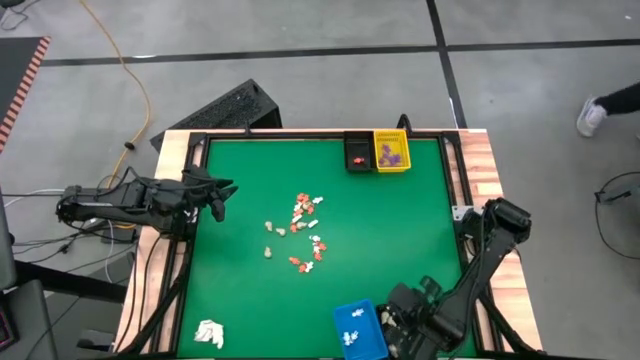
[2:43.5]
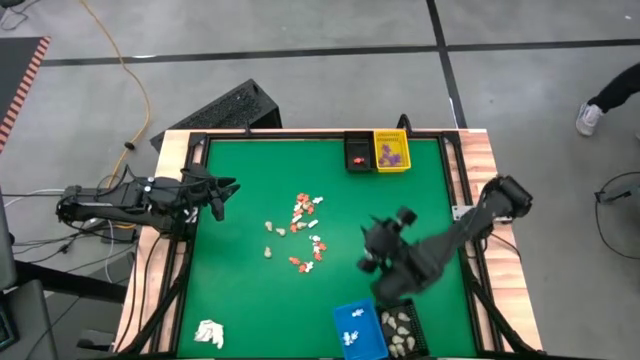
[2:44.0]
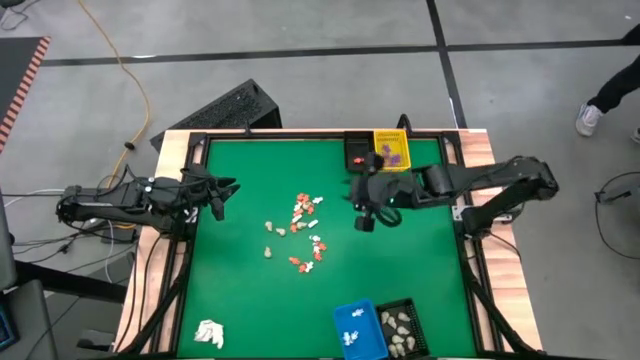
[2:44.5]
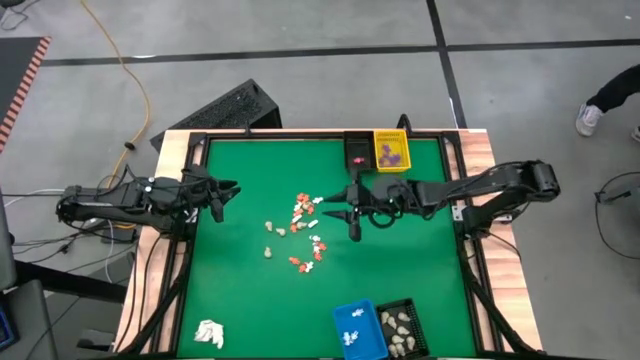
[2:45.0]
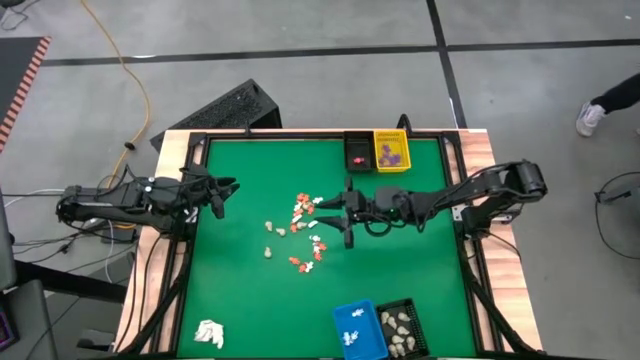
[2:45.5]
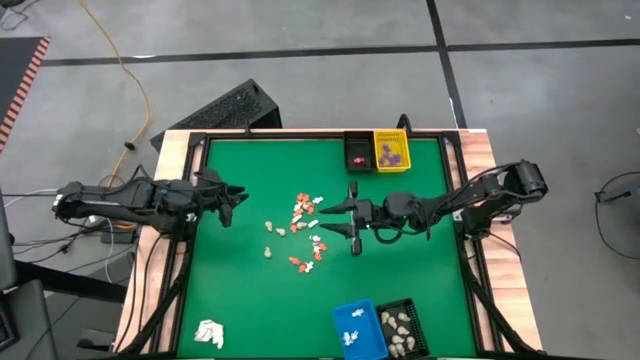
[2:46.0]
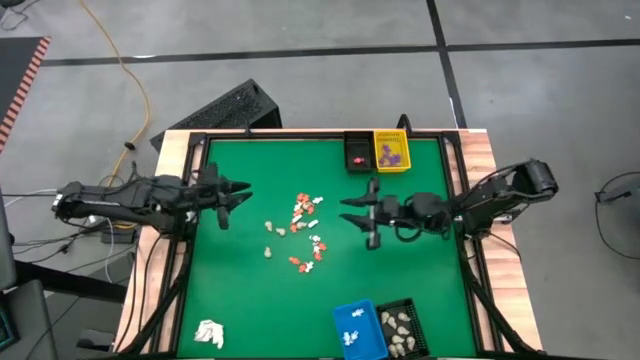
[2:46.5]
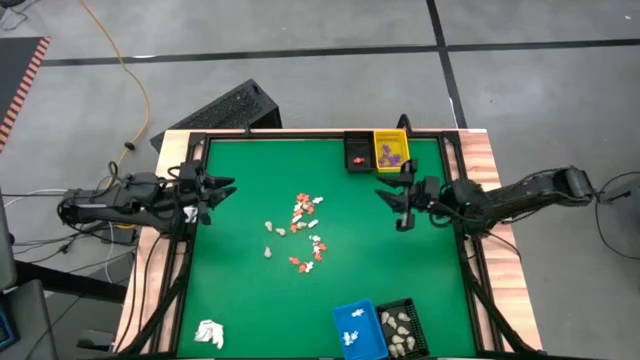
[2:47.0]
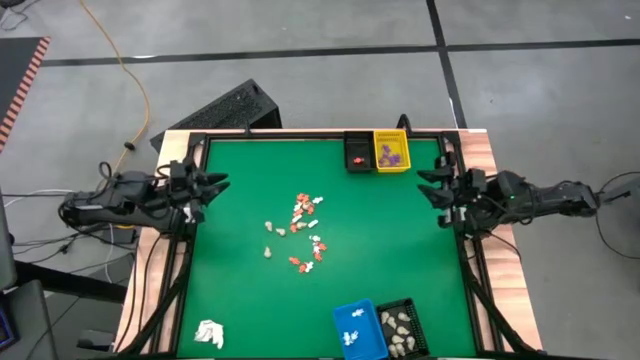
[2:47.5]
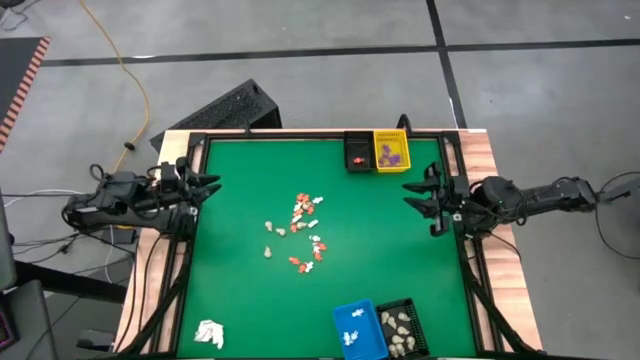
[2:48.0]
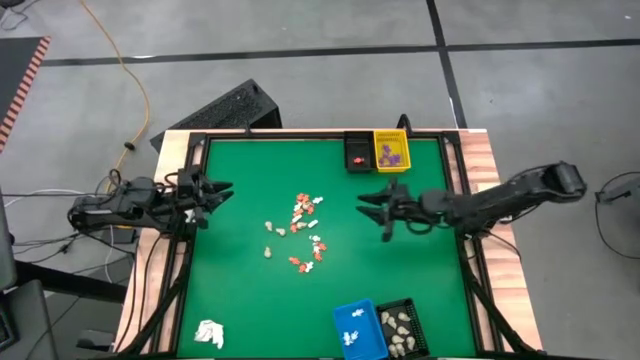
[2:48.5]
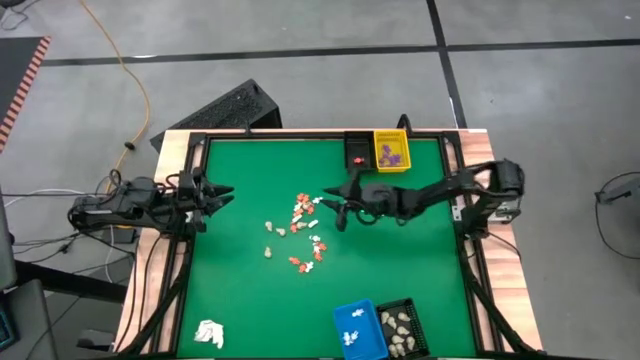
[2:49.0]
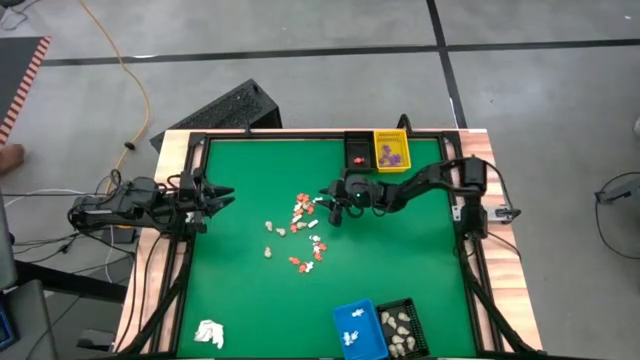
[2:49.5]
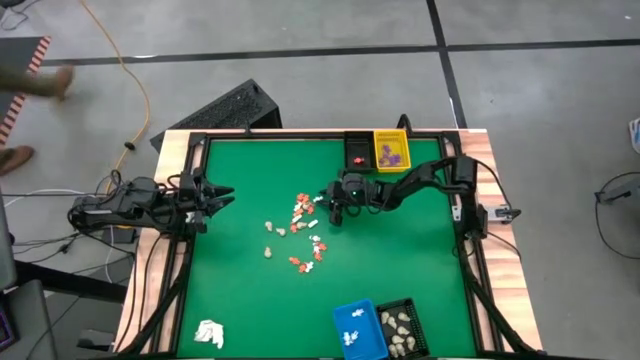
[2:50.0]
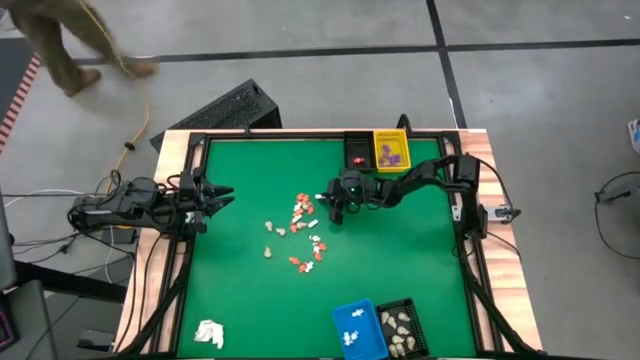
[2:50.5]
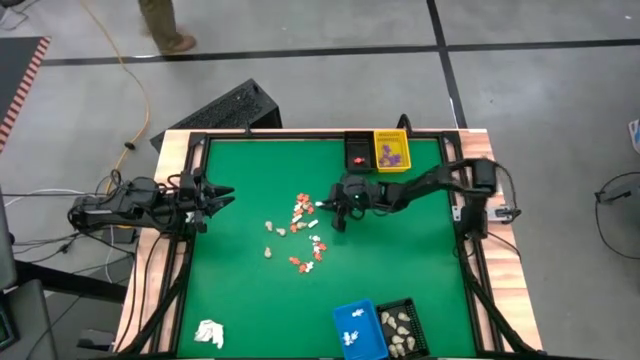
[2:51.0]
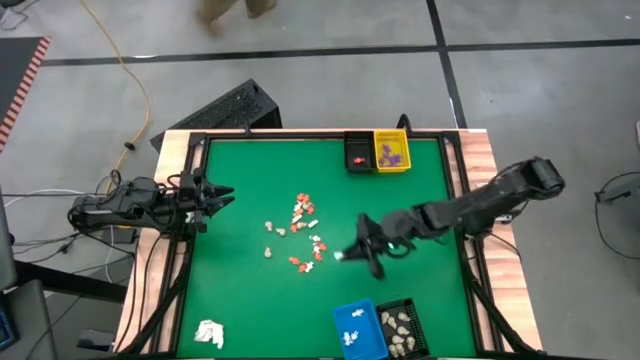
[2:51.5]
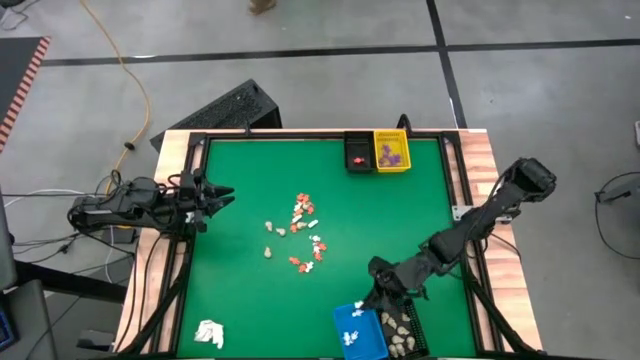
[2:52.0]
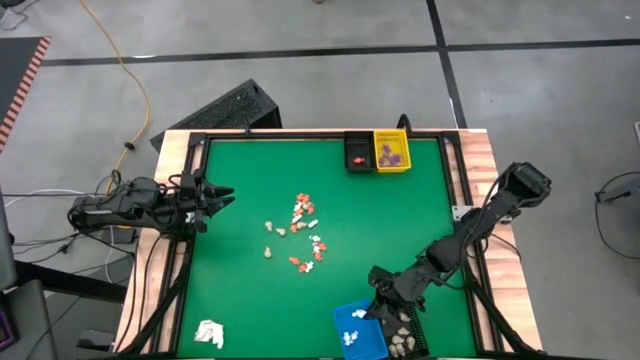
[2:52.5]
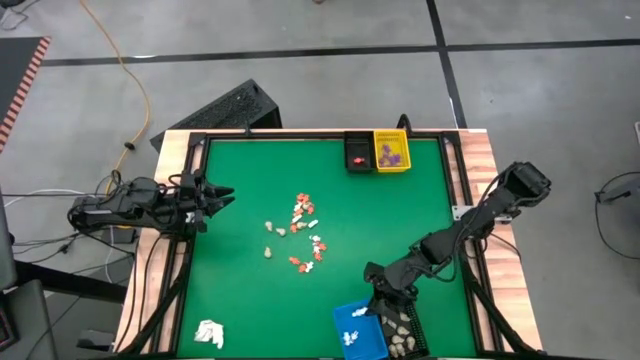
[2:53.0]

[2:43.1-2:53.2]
Task: Sort Halloween decoration
Put the white skeleton toy into the blue basket

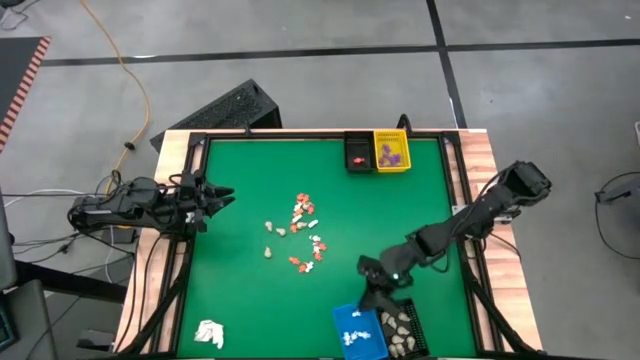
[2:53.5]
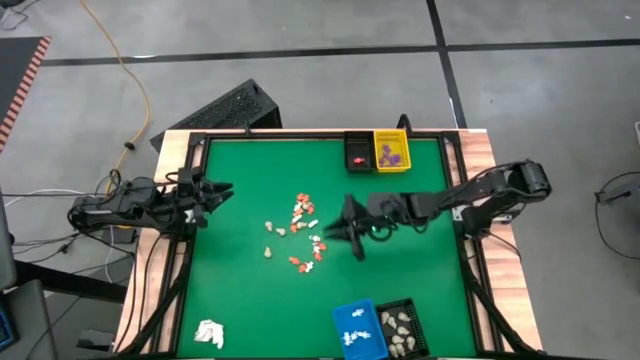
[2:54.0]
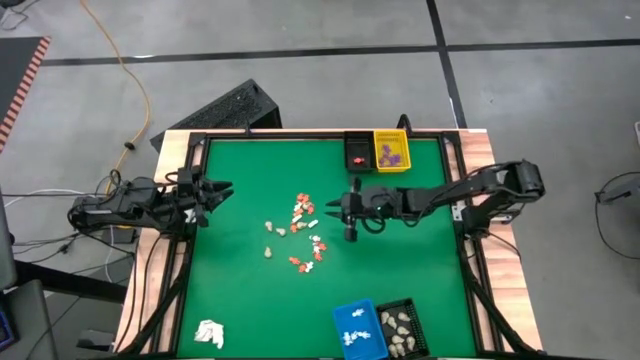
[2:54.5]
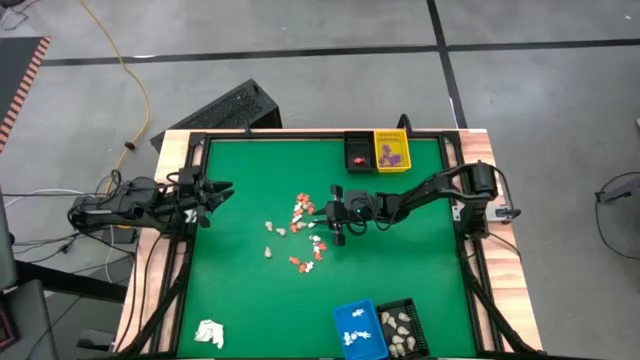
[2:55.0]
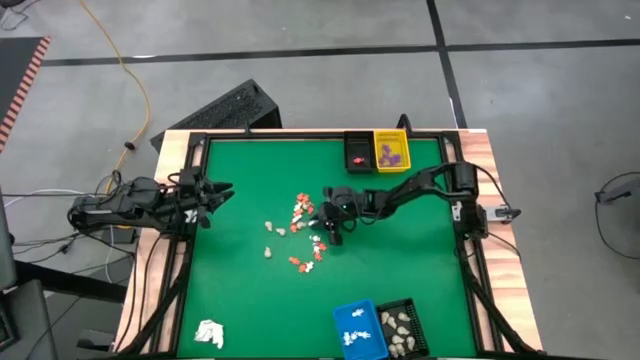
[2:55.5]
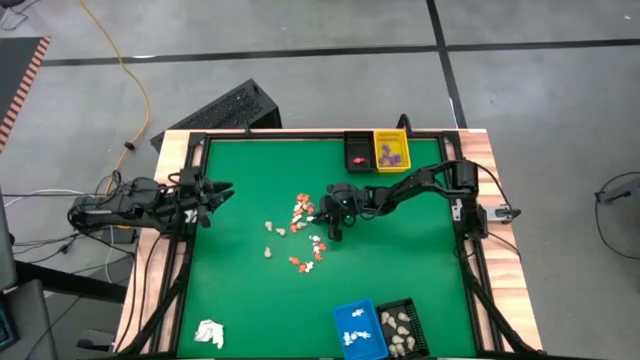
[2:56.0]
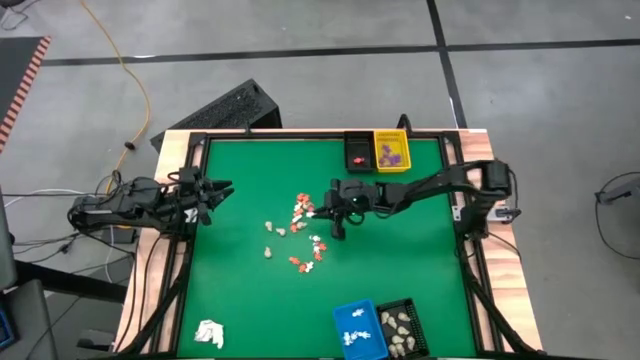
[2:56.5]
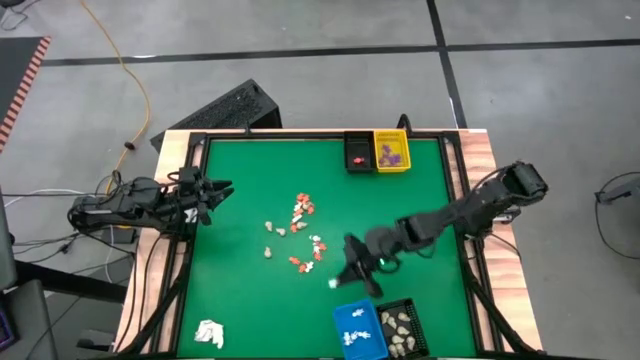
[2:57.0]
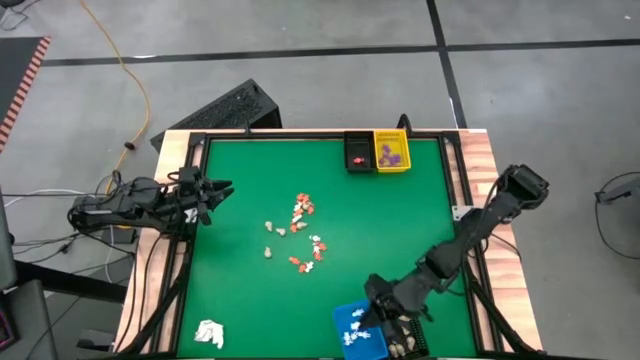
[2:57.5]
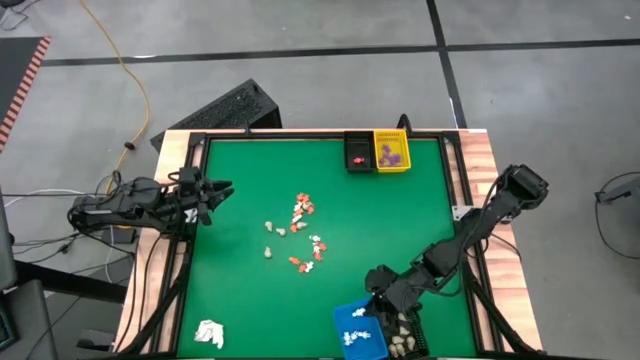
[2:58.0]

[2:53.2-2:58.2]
Put the white skeleton toy into the bottom black basket

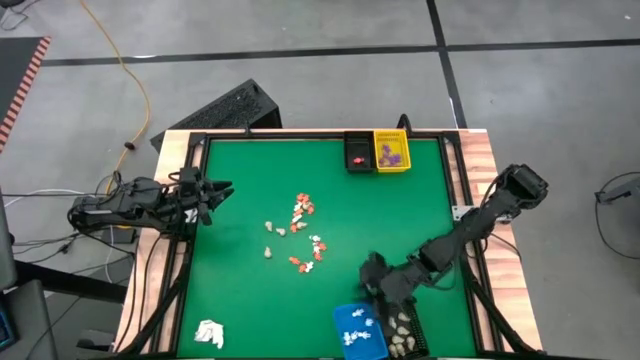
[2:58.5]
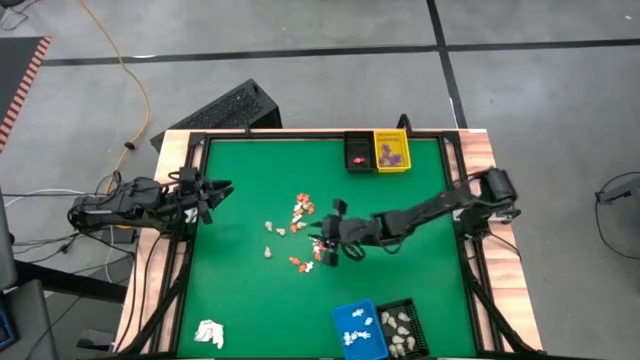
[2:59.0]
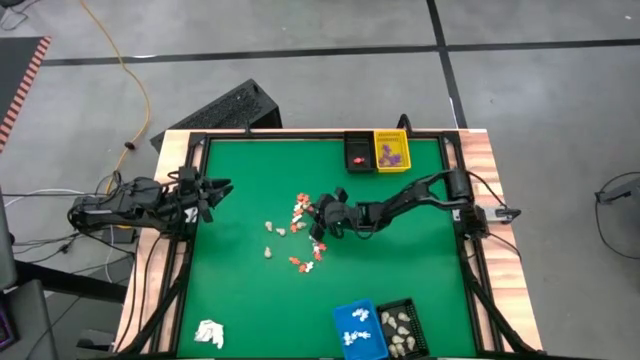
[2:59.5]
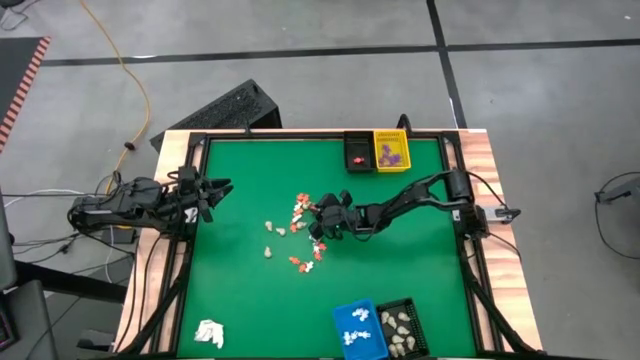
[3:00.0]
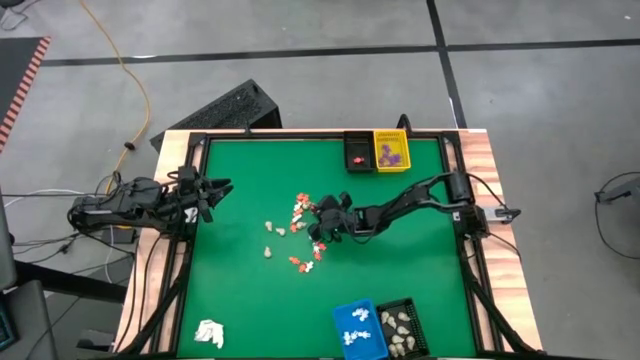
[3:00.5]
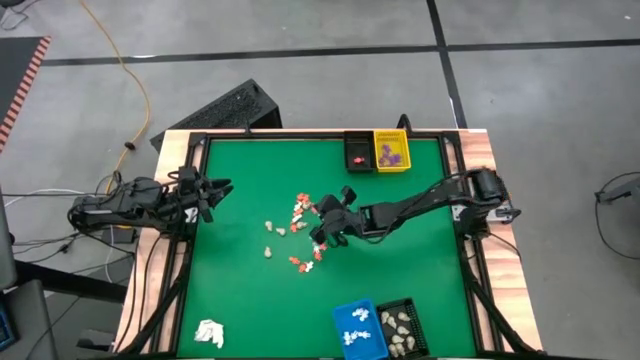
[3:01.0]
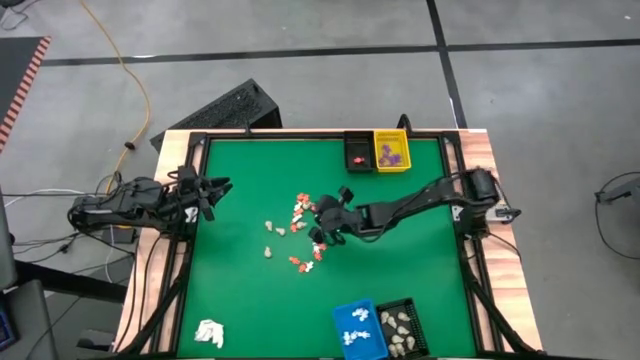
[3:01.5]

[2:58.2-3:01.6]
Put the orange skeleton toy into the top black basket

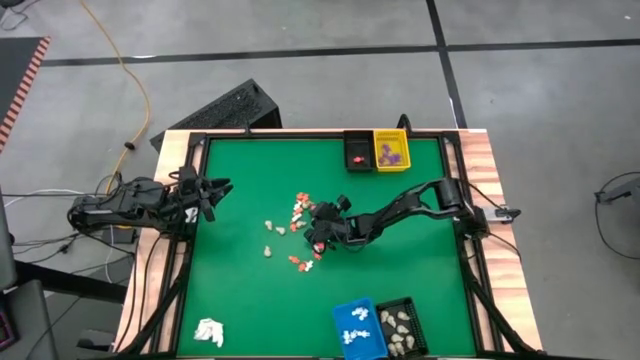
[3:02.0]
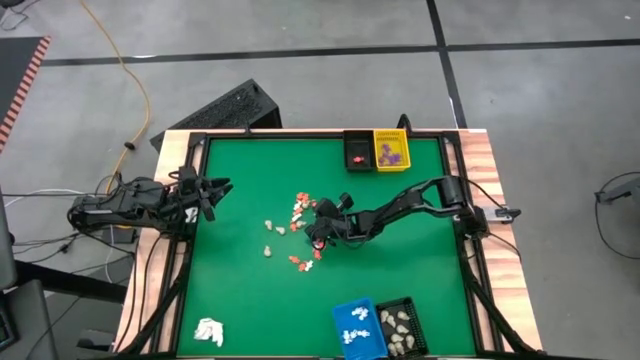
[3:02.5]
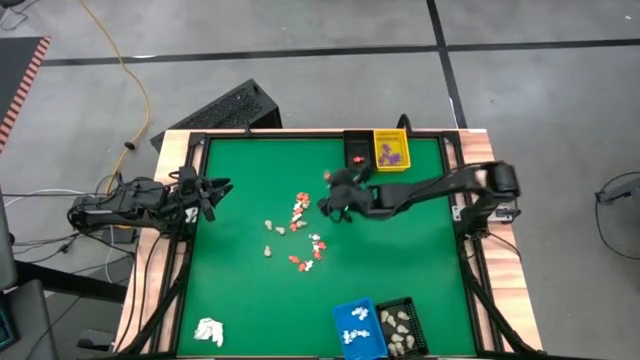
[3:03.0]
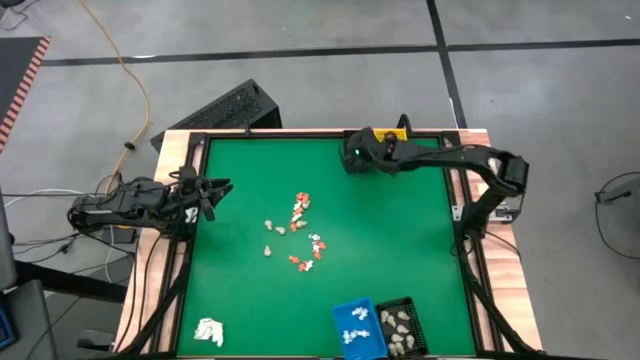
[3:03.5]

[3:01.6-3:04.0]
Put the orange skeleton toy into the top black basket

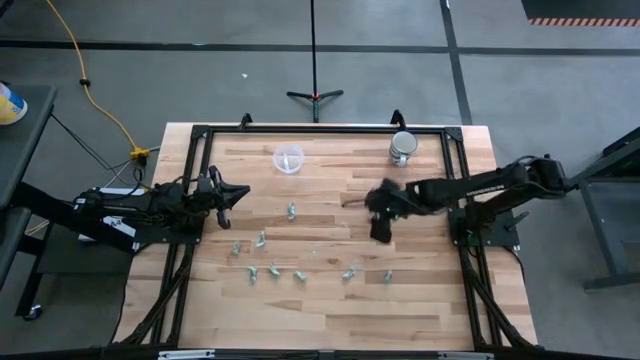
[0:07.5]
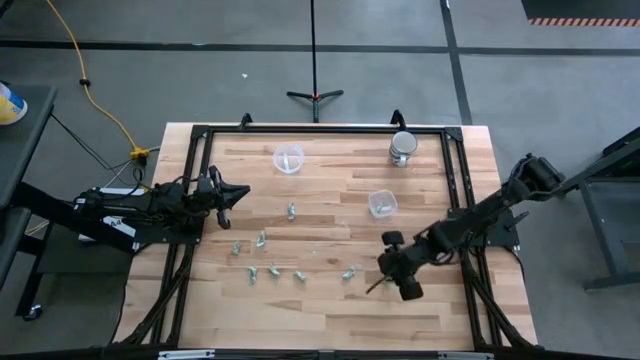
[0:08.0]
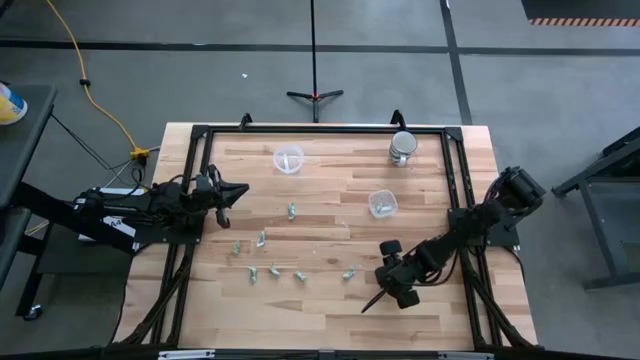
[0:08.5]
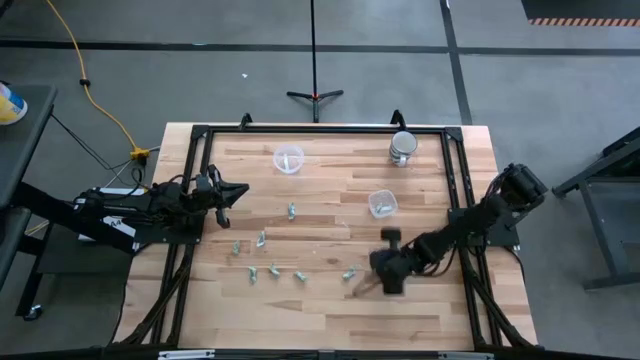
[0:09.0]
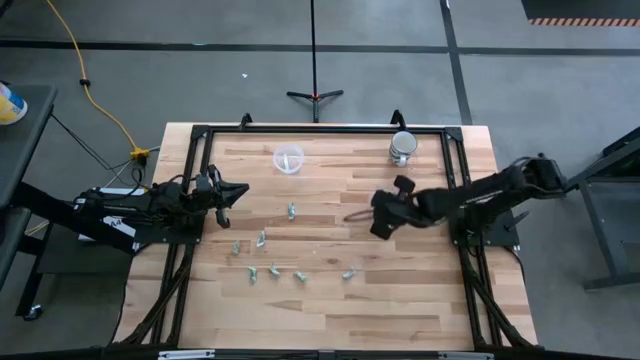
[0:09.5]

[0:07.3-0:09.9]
Task: Pick and place Stevia / Truvia into bins
Put the stevia packet into the square transparent container
